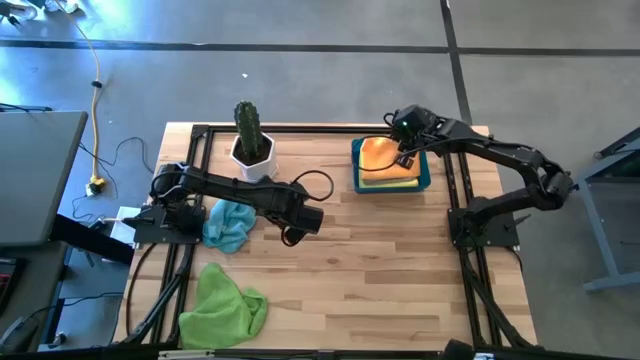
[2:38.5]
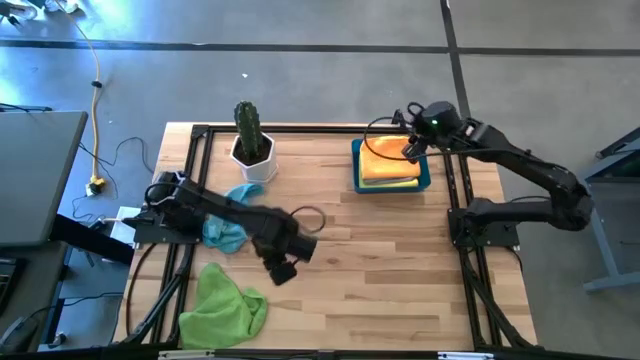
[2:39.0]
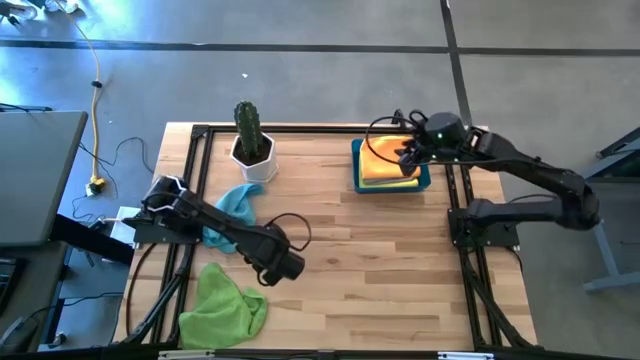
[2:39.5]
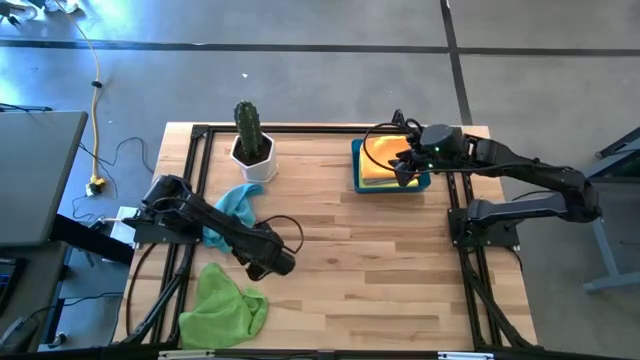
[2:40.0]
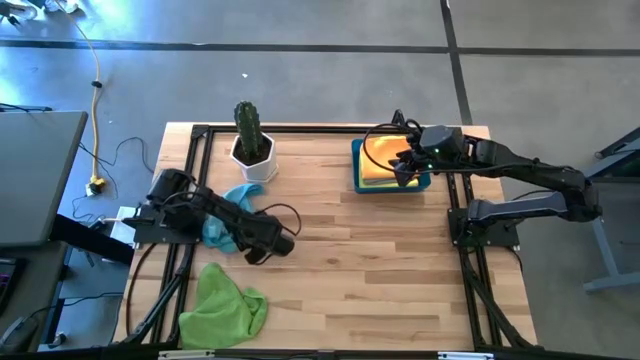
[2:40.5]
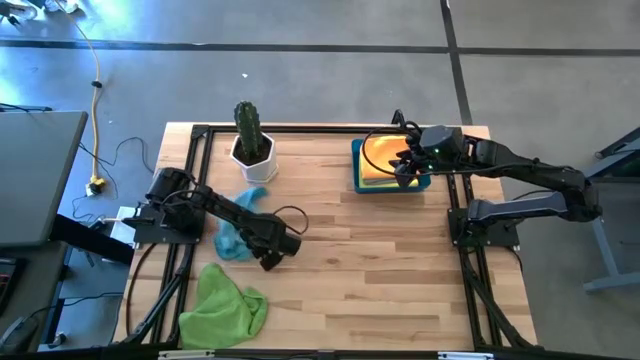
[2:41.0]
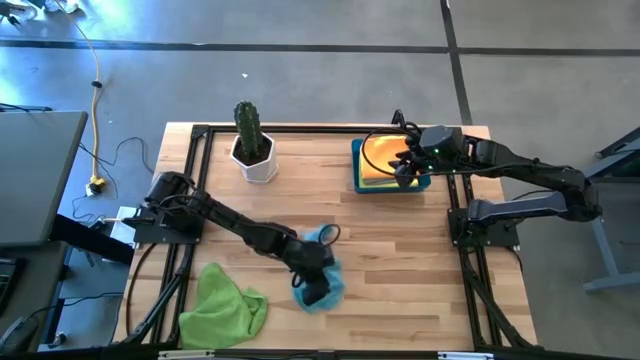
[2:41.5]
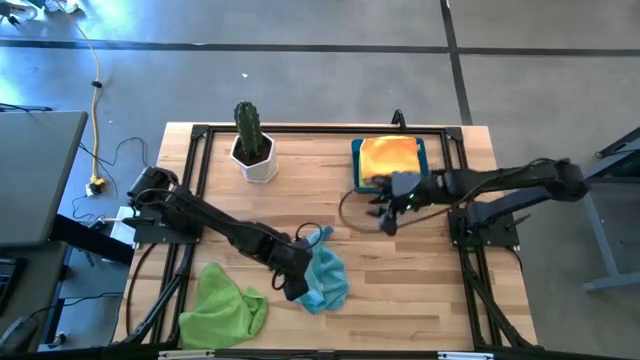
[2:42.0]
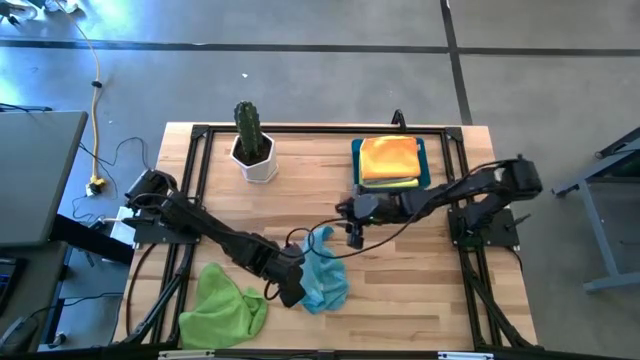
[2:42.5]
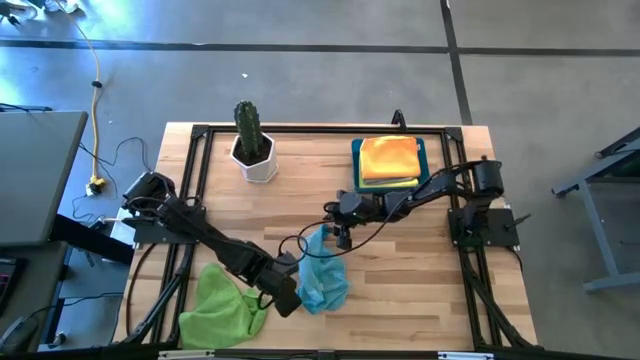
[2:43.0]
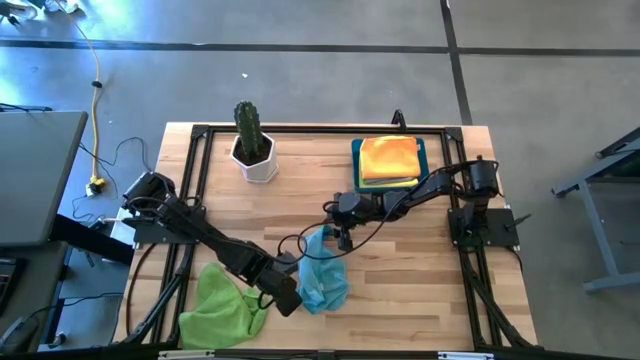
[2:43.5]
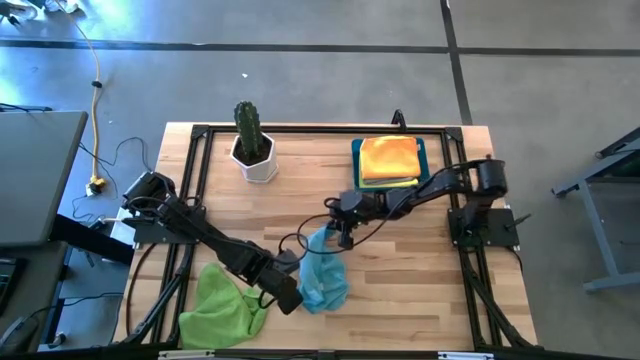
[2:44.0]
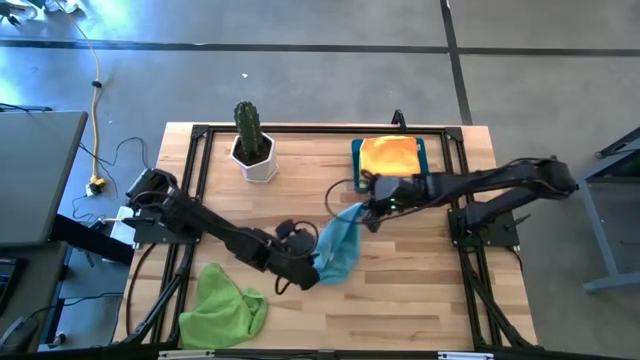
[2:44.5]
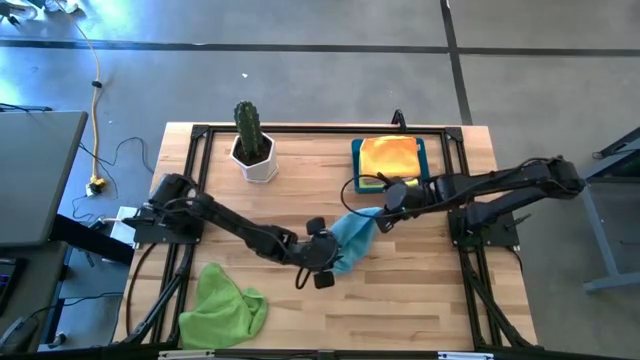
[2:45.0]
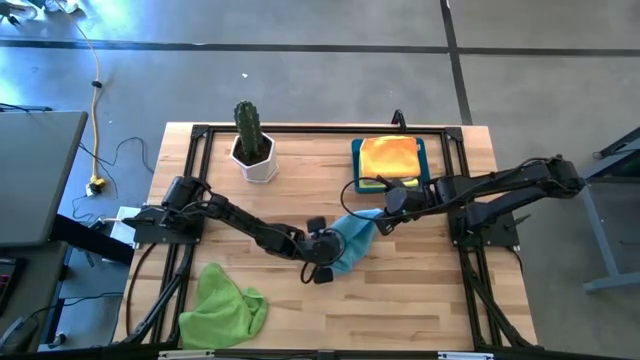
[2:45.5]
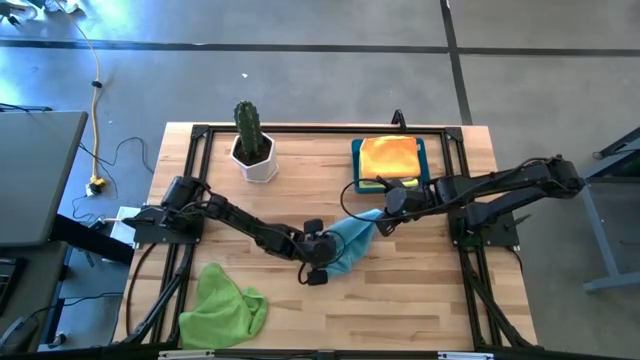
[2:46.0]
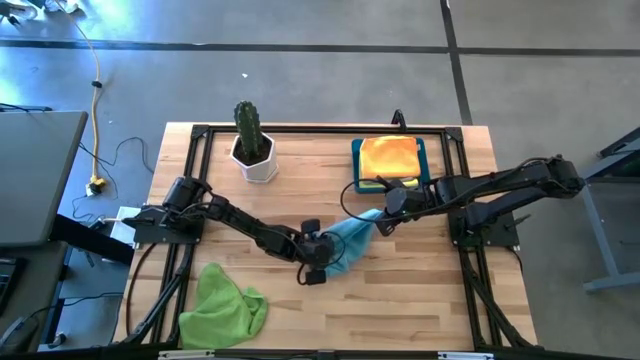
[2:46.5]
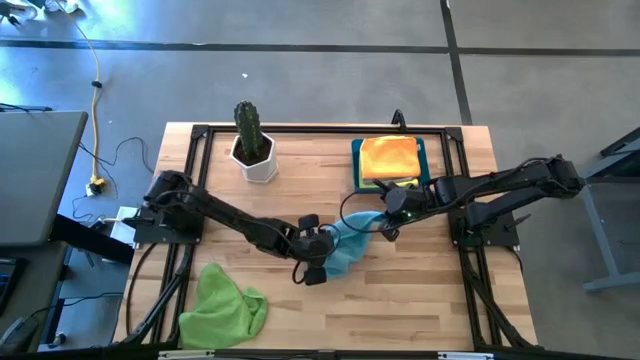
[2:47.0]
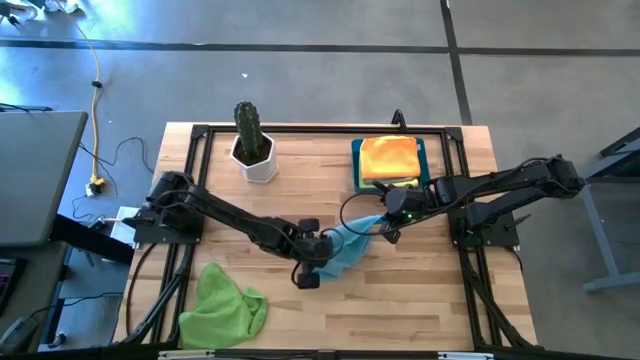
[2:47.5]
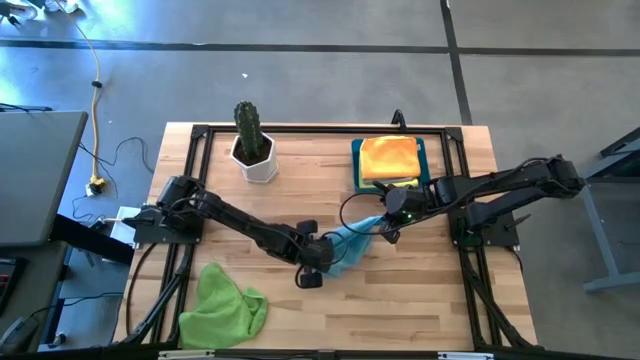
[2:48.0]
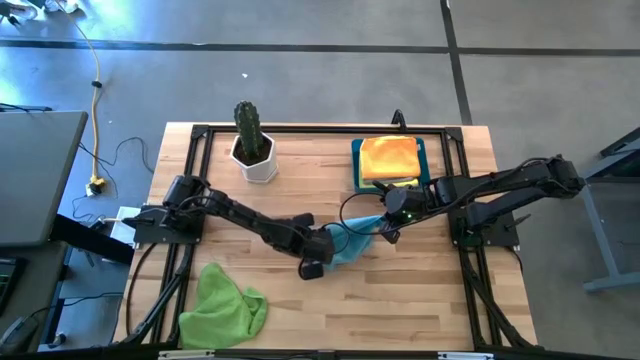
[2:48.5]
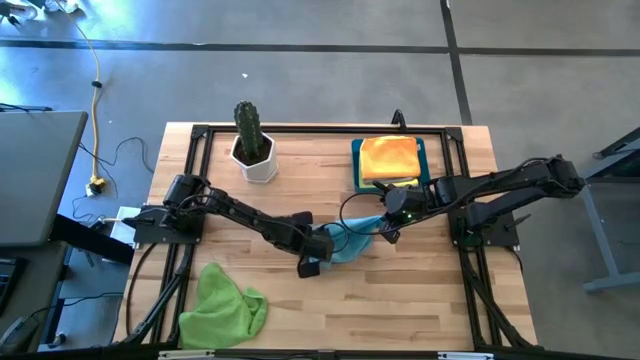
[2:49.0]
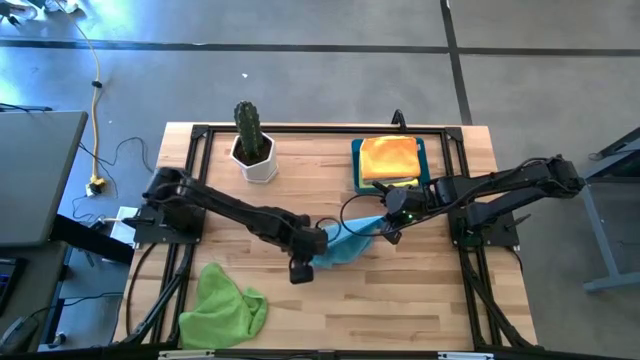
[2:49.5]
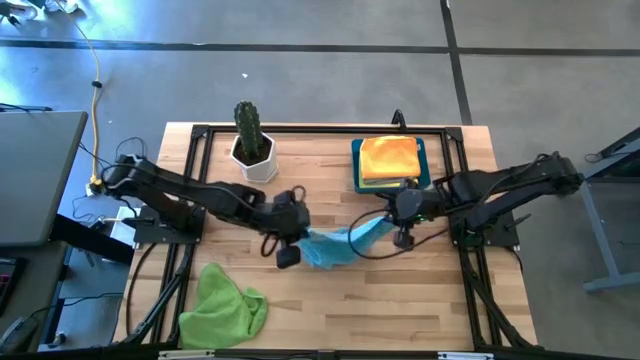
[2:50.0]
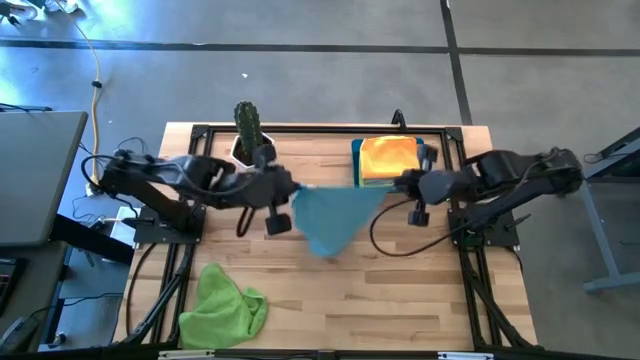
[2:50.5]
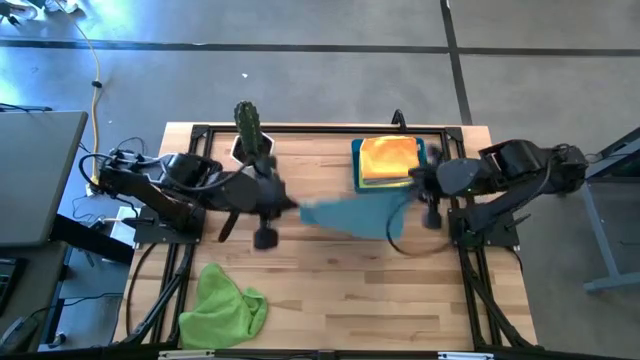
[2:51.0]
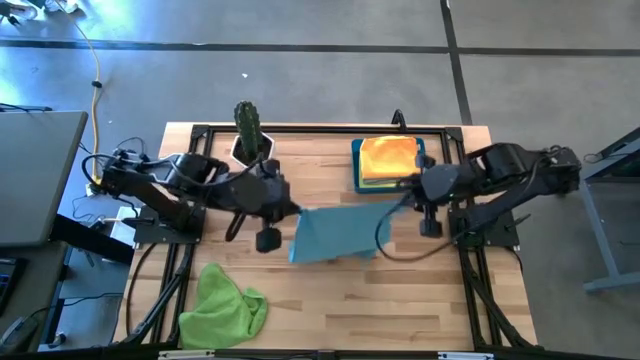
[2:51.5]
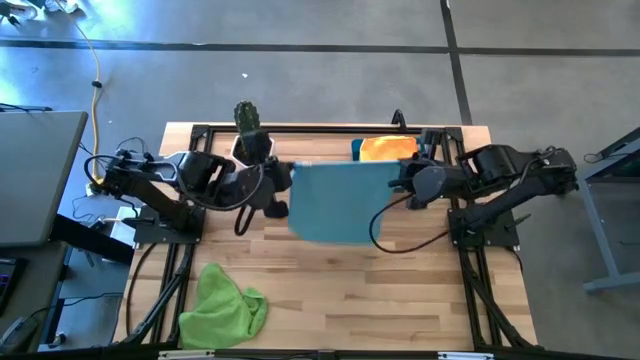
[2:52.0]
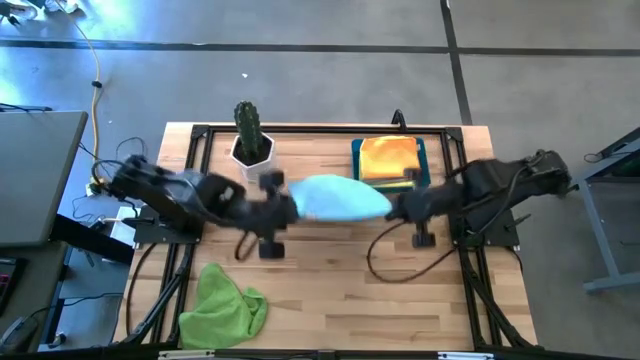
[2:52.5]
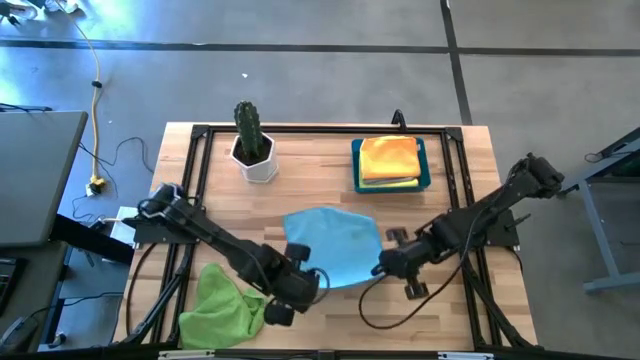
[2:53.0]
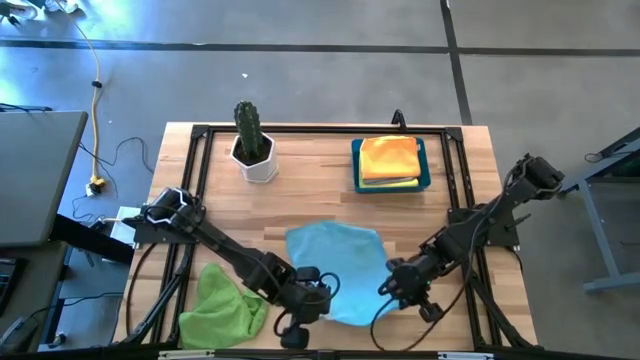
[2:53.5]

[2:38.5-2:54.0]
Task: Fold microfiber towels
Fold the blue microfiber cloth

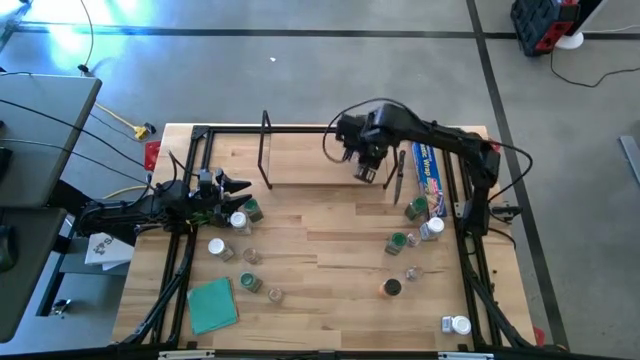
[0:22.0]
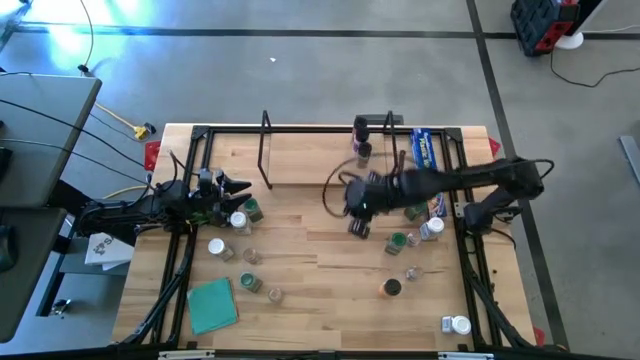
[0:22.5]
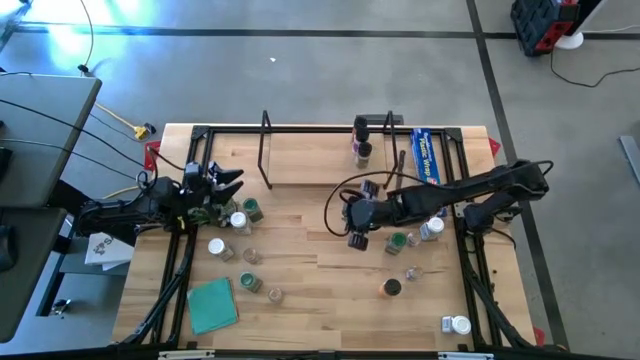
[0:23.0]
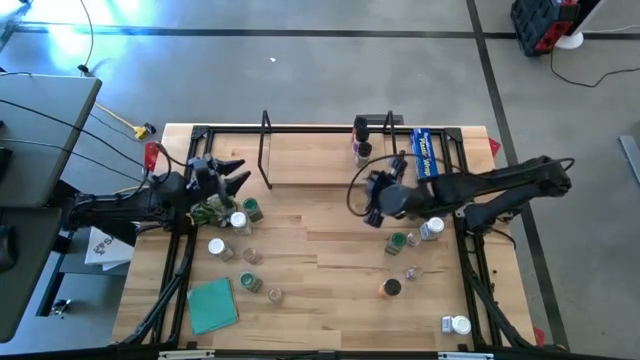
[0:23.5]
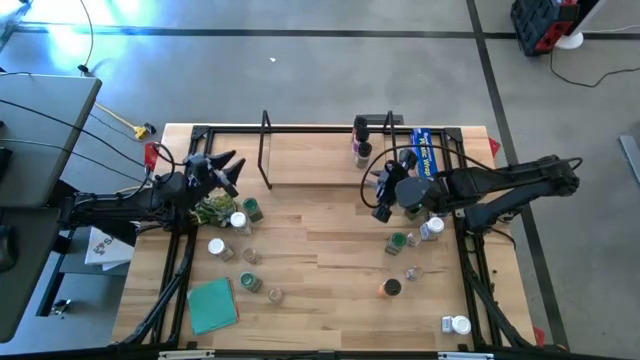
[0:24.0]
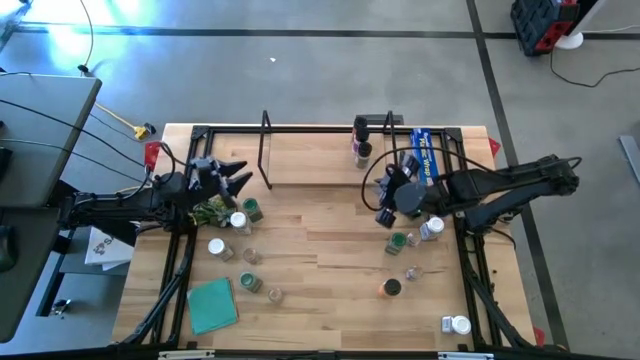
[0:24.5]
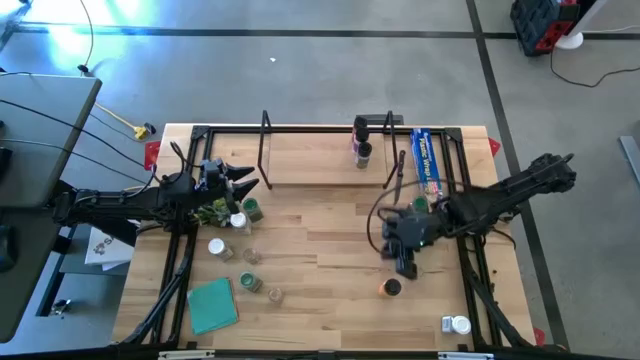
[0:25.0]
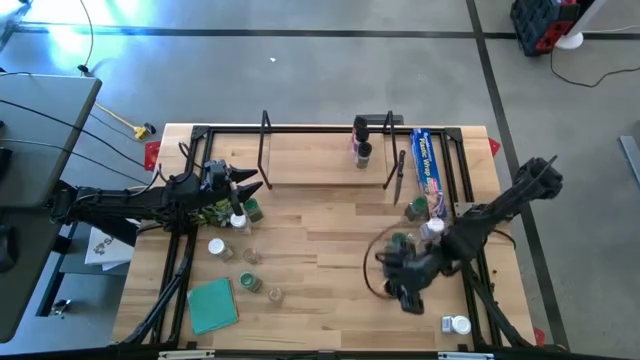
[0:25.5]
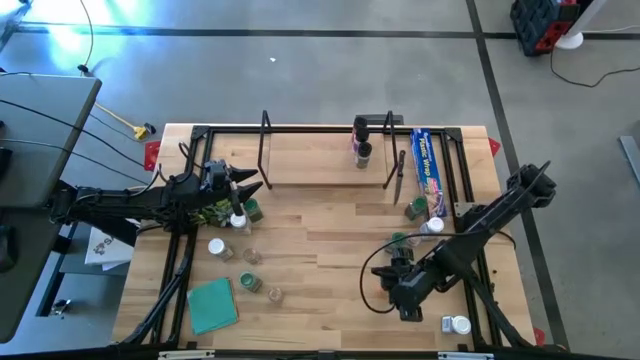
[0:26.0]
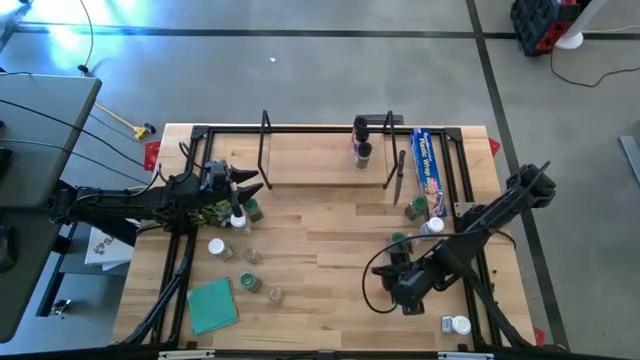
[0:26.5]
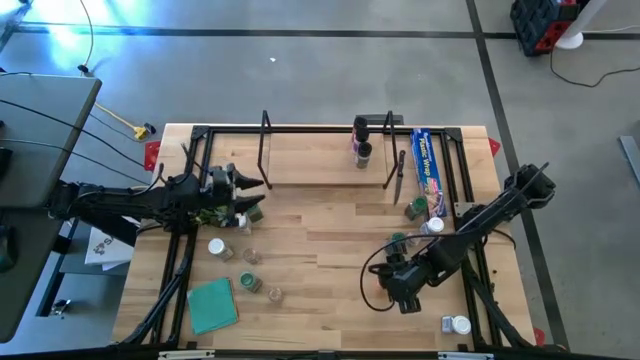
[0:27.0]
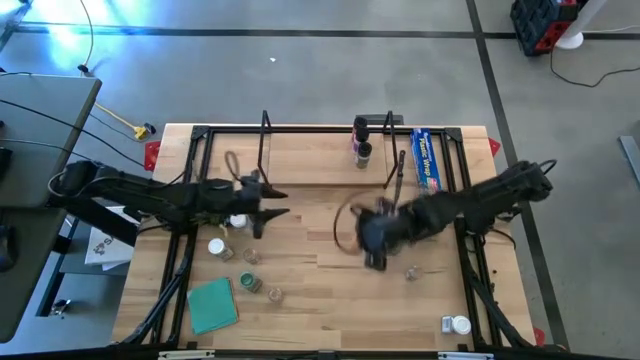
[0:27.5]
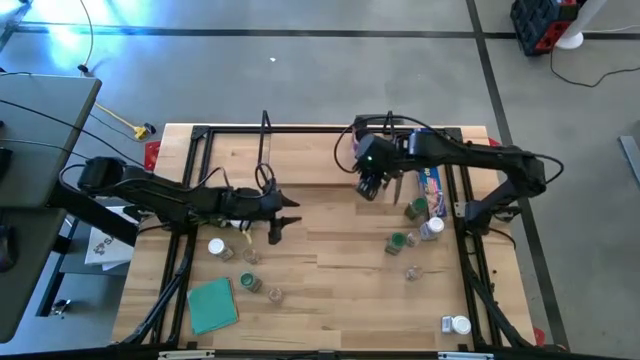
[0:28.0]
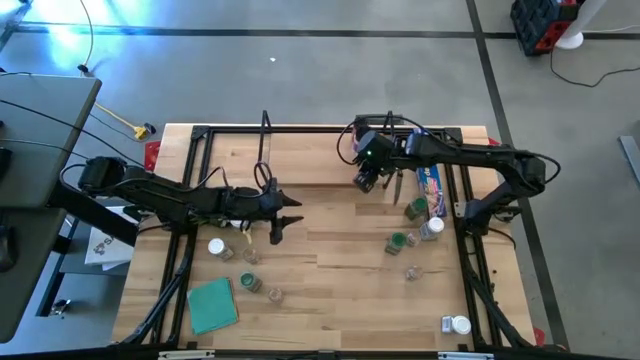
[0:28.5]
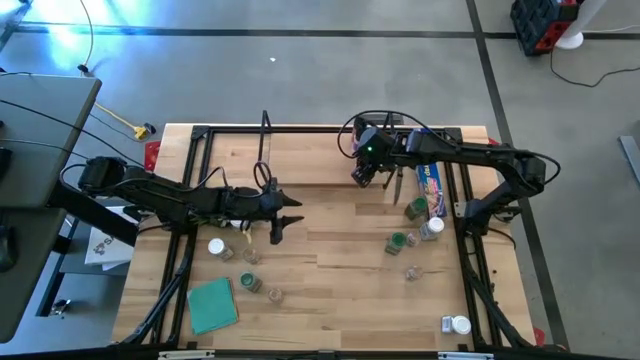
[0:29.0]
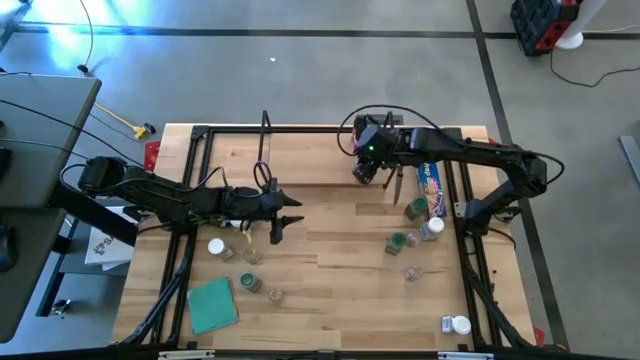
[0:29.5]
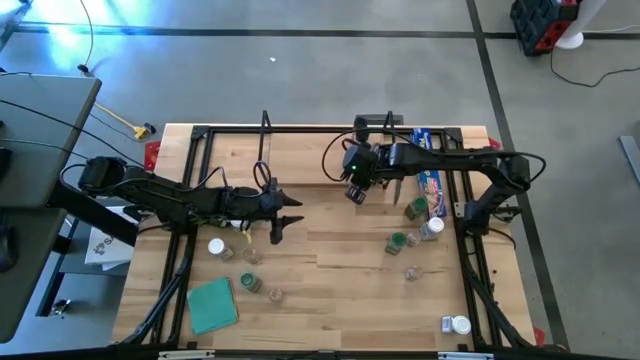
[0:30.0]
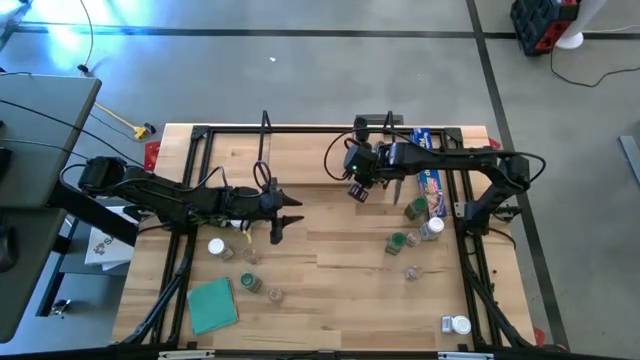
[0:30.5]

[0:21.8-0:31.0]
Task: Shelf spices
Put the black orange seasoning bottle on the shelf
